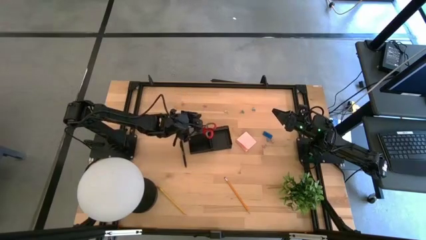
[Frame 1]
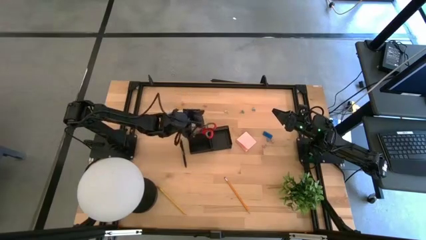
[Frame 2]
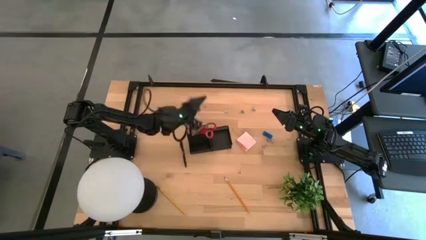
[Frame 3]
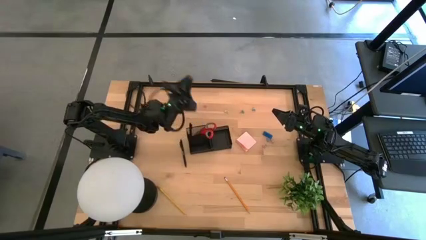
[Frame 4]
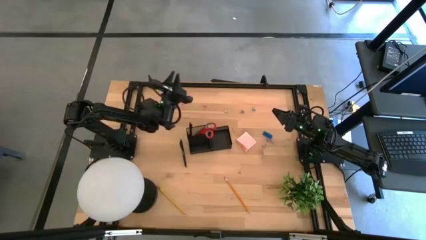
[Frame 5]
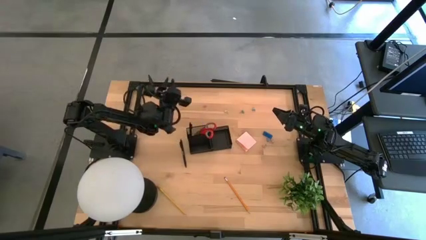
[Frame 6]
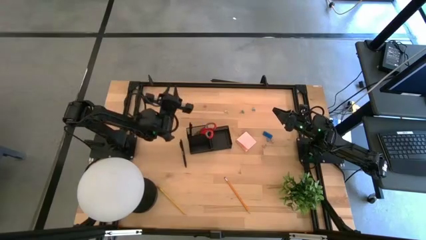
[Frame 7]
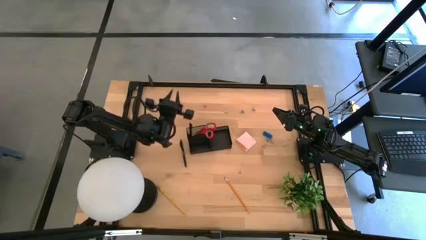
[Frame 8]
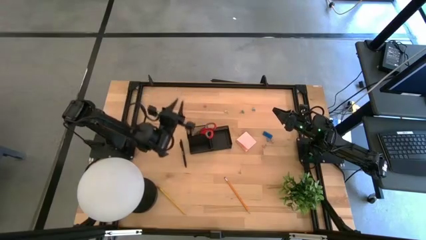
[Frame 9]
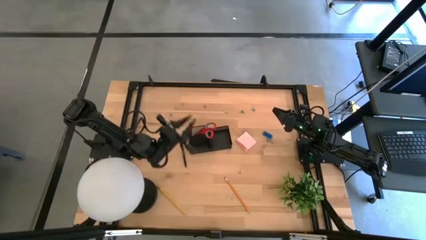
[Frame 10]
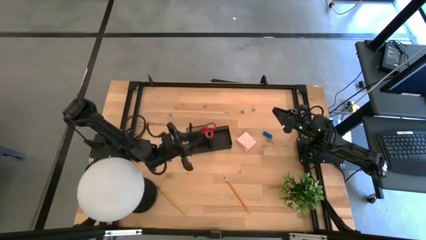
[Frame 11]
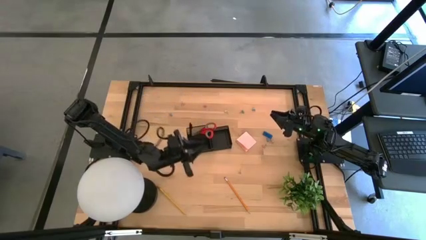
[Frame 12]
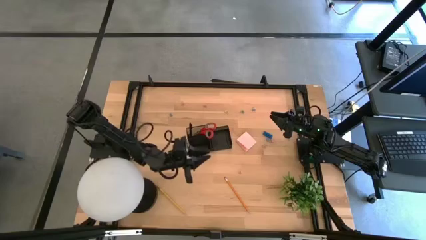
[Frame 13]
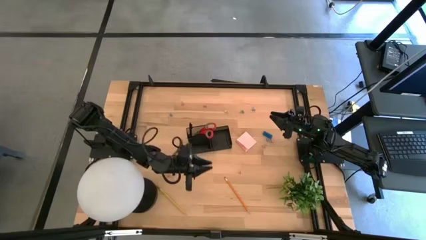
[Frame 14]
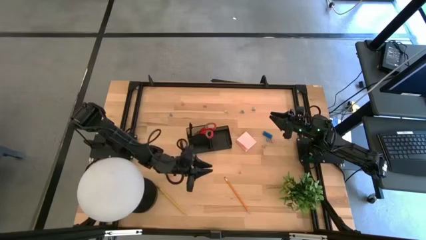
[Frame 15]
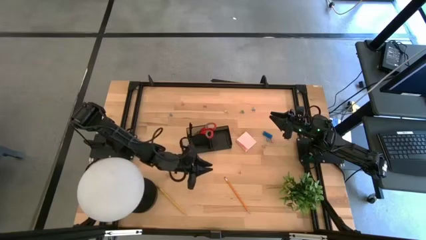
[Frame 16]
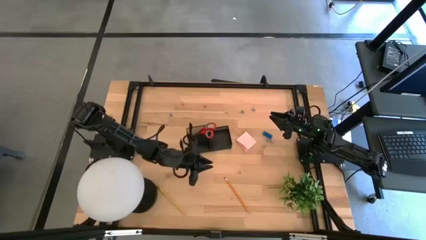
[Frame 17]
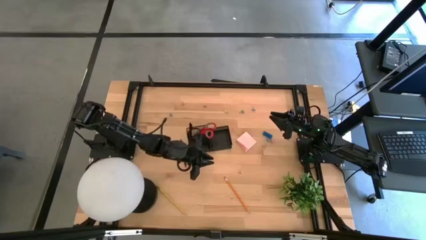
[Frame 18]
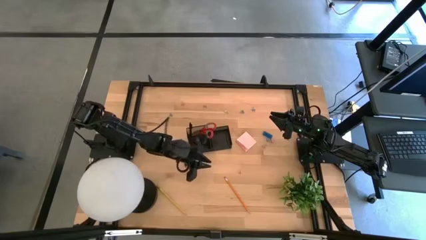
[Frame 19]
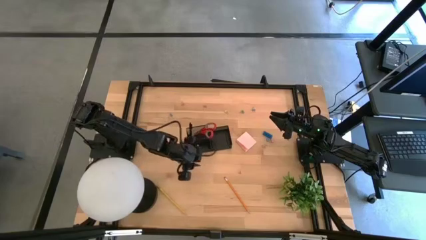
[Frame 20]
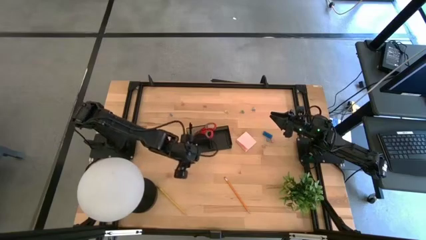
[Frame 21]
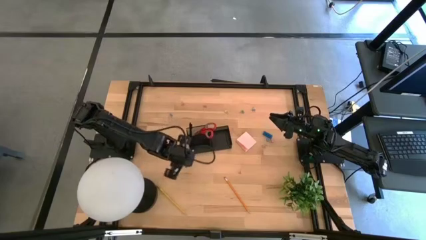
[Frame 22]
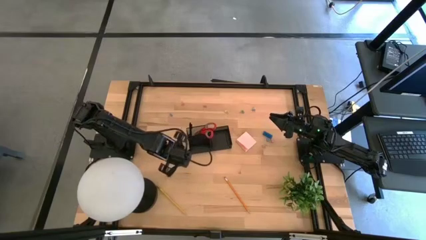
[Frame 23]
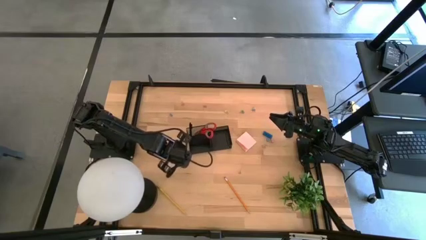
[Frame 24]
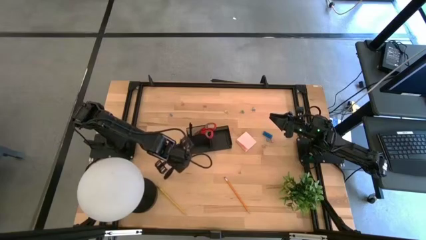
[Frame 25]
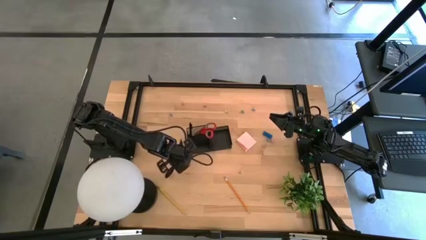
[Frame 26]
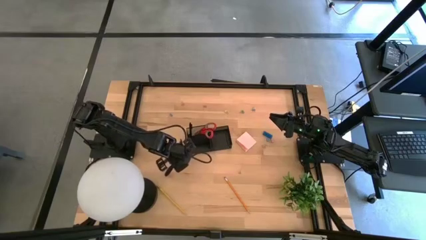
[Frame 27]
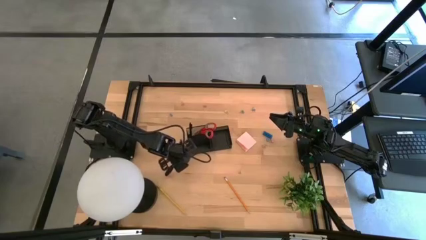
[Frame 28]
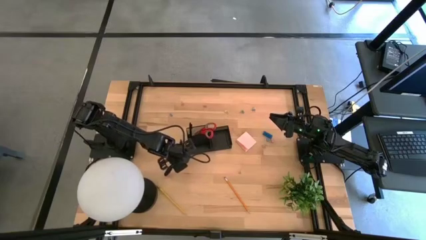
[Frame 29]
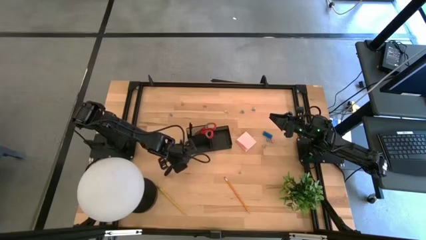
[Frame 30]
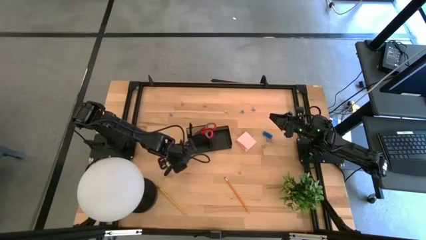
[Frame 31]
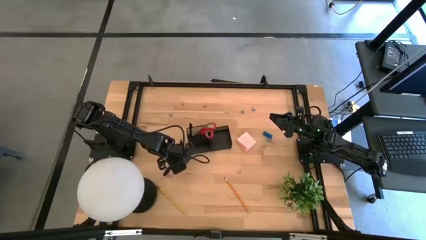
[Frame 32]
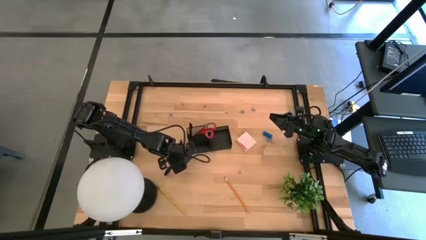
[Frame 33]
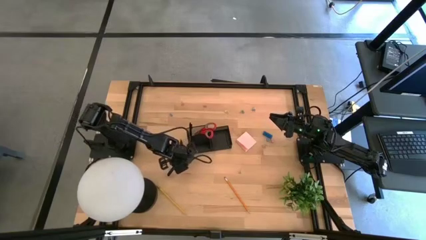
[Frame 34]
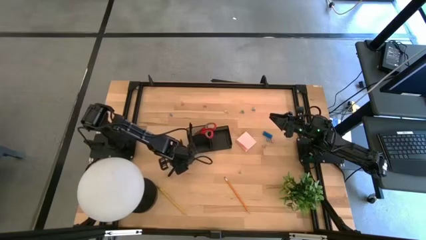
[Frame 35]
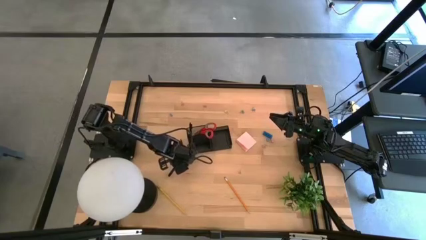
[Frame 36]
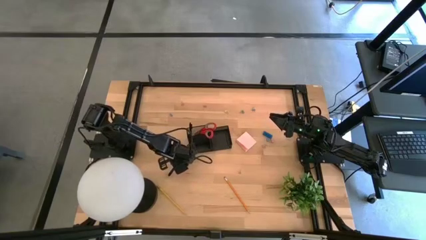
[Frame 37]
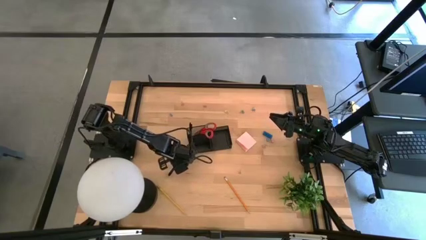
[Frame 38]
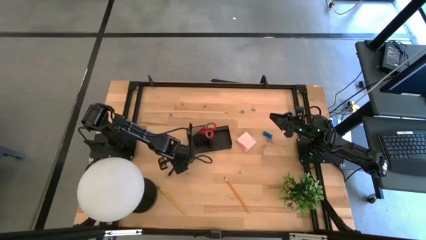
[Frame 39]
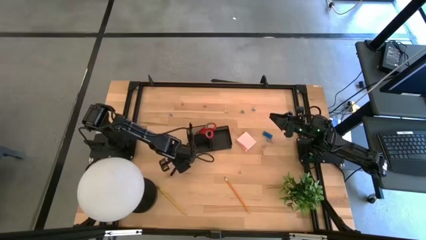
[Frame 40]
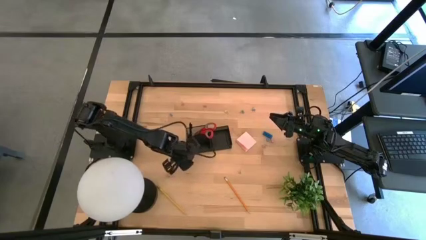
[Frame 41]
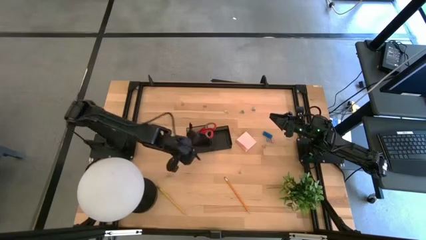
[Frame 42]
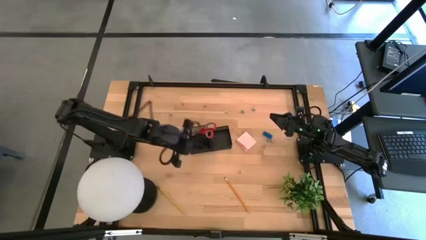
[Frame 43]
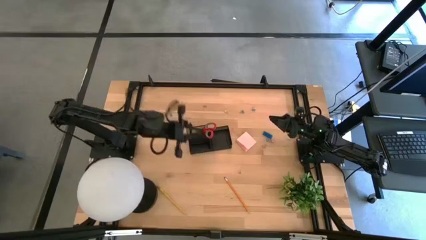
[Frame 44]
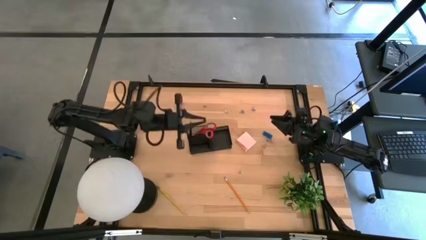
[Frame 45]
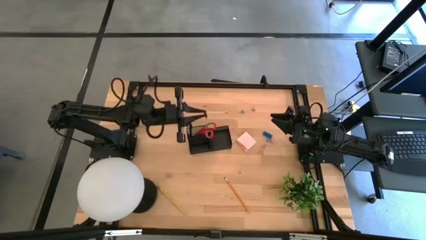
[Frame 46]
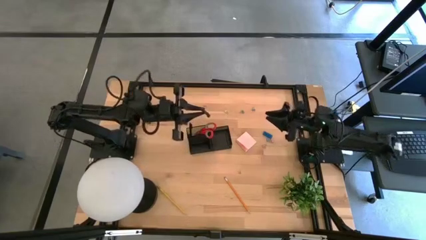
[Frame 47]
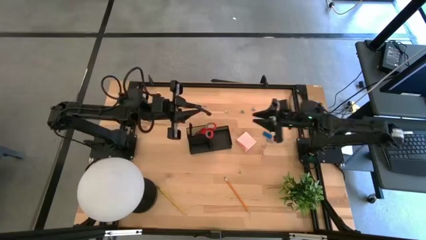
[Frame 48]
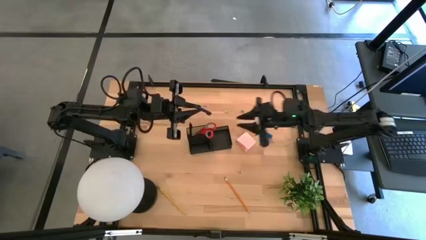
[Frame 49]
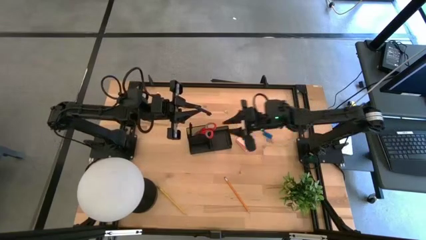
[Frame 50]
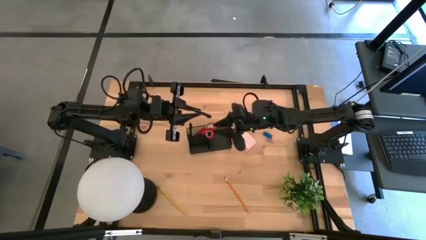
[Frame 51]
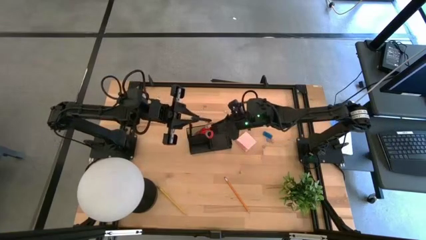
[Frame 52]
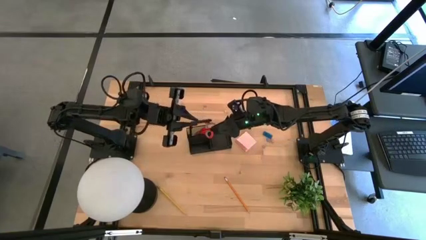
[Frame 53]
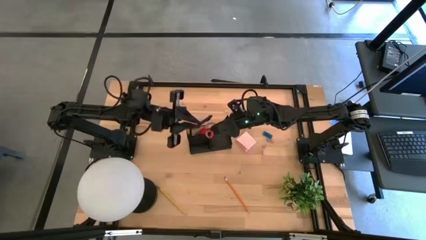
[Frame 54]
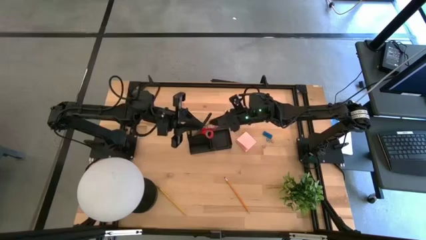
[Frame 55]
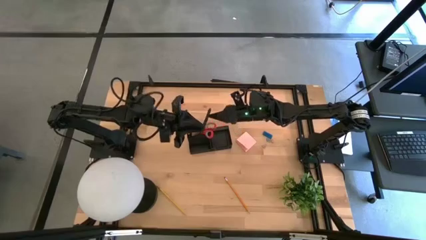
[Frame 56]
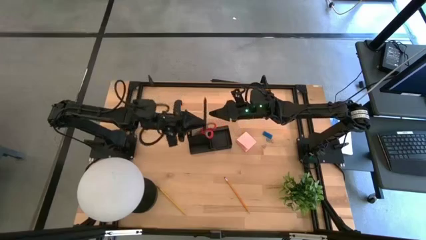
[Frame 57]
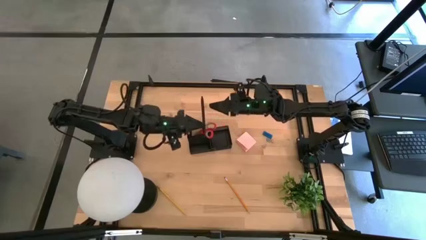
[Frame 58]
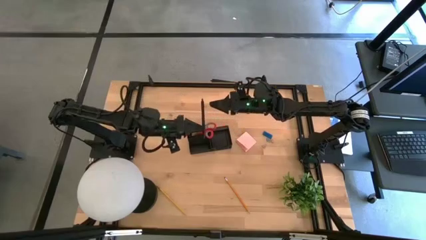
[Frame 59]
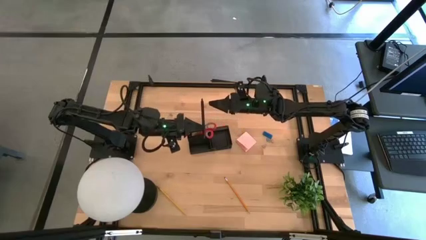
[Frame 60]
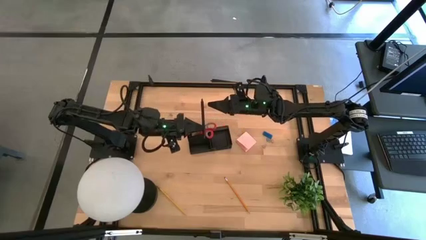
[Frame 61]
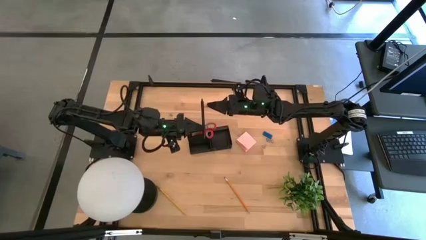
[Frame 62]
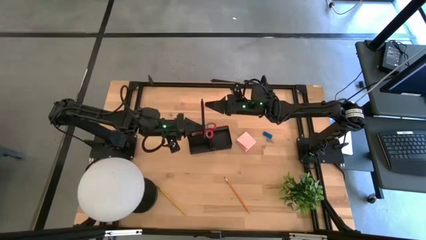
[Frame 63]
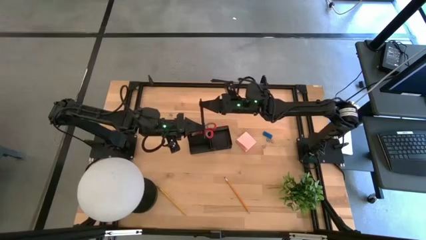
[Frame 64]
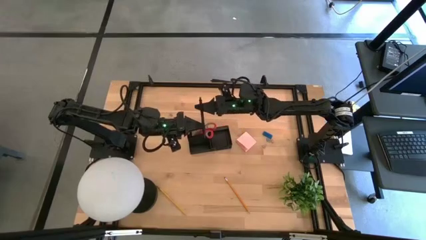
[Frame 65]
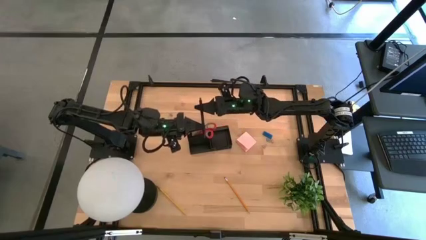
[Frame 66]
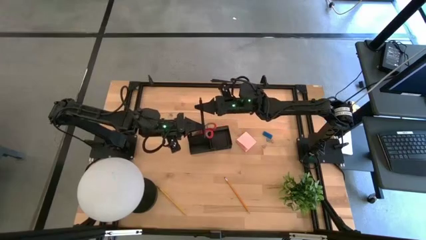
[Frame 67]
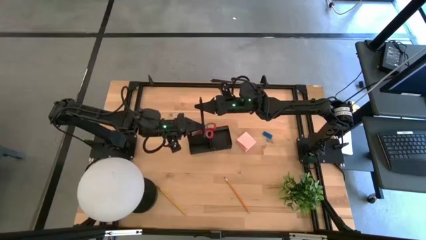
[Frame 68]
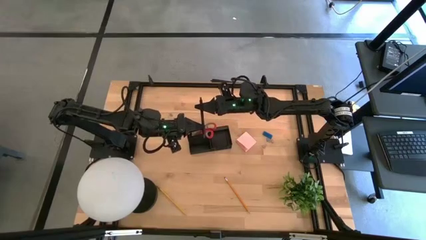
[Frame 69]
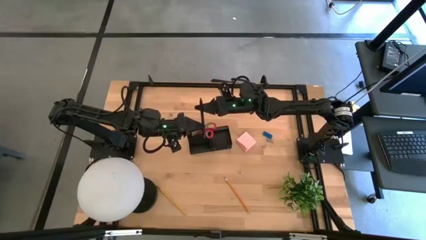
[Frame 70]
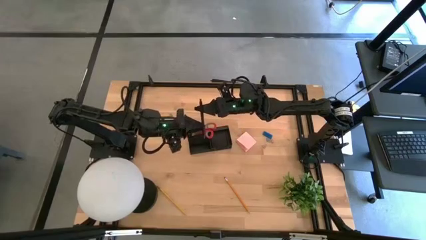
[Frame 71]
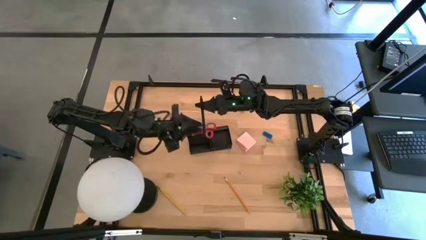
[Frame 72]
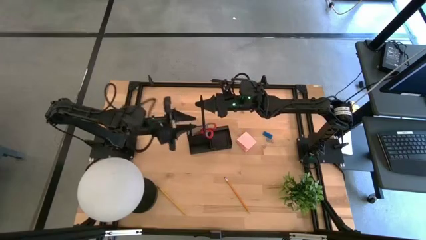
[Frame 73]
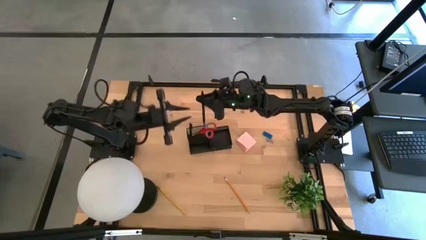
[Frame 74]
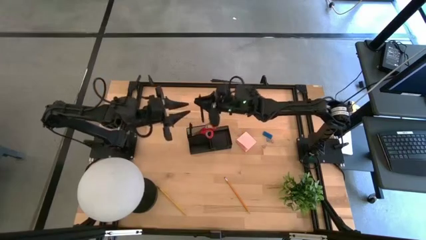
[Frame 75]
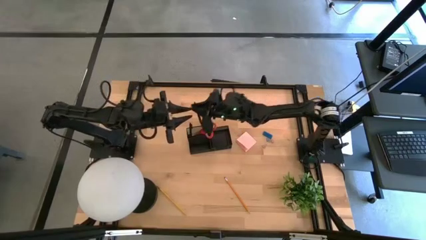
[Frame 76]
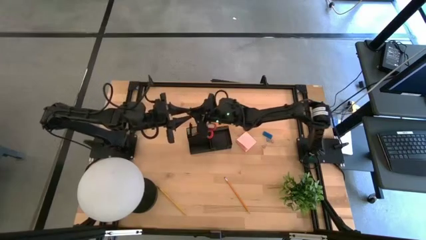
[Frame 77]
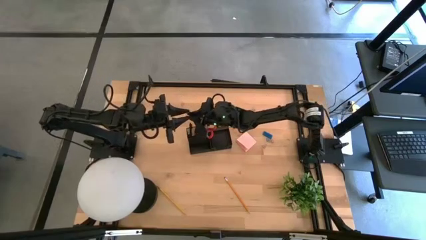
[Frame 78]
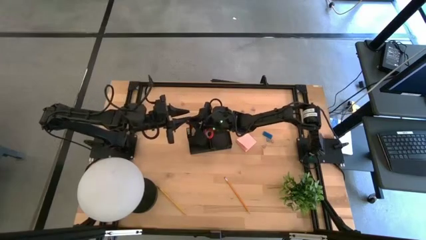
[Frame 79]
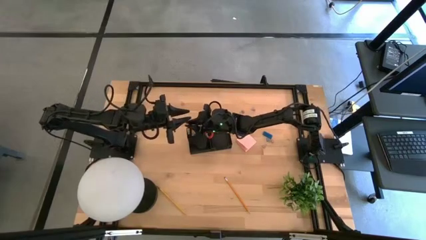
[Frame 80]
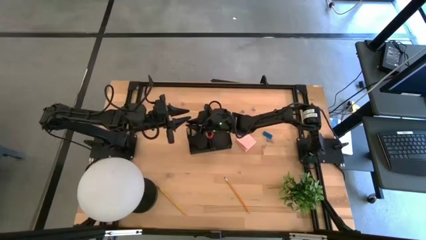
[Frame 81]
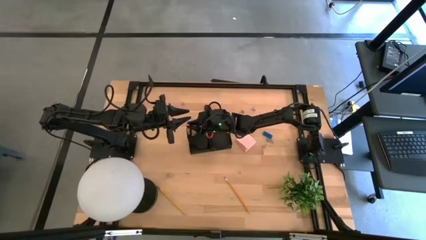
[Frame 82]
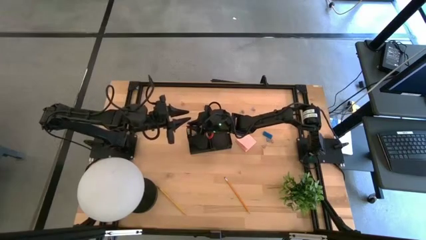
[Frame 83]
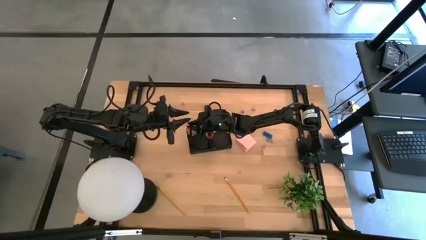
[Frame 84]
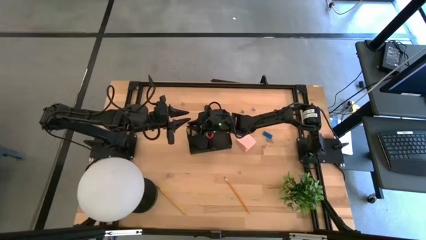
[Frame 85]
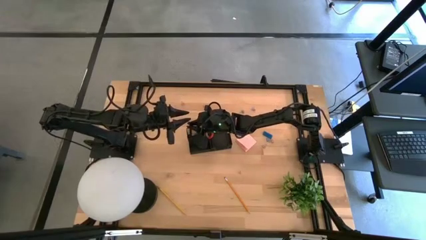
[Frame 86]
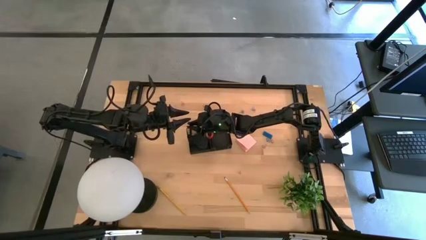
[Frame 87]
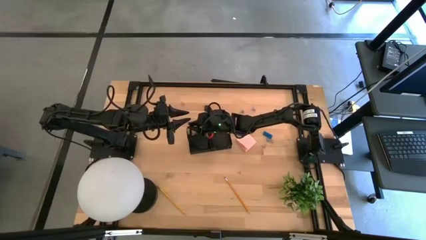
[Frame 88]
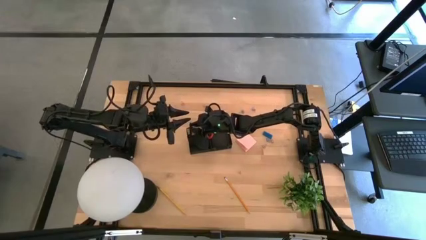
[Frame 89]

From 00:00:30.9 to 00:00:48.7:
Task: Pick and place office supplies into organizer
Put the black pen into the desk organizer
